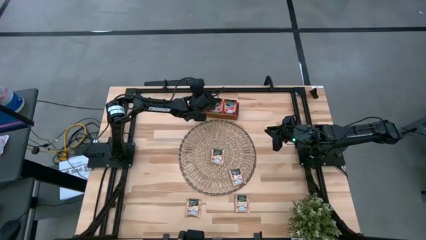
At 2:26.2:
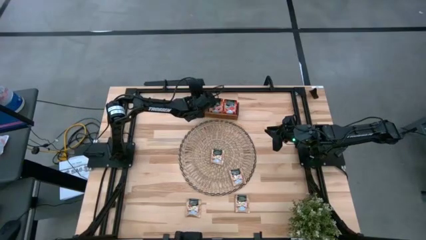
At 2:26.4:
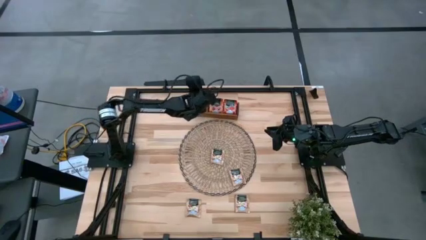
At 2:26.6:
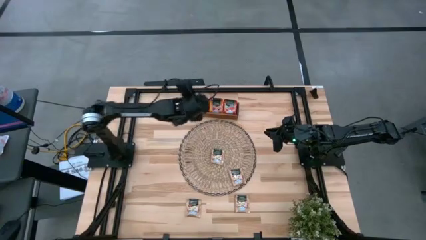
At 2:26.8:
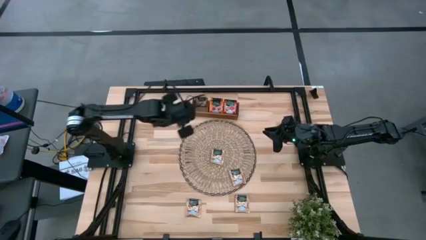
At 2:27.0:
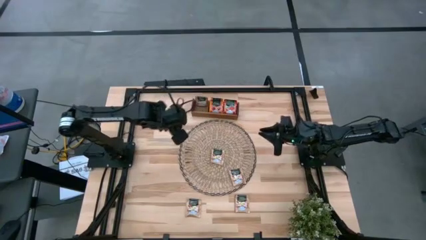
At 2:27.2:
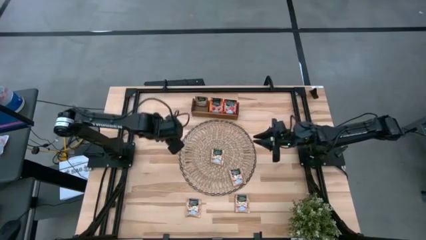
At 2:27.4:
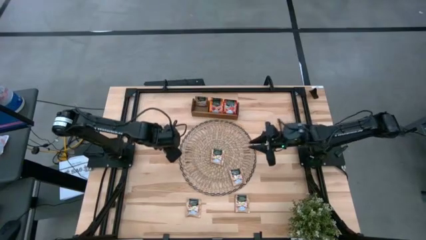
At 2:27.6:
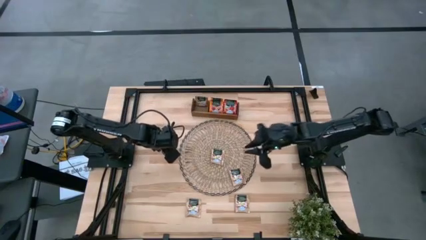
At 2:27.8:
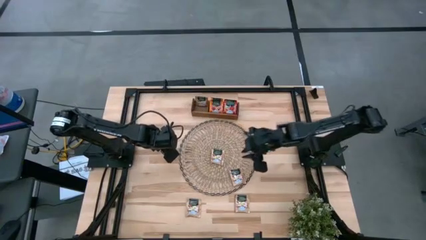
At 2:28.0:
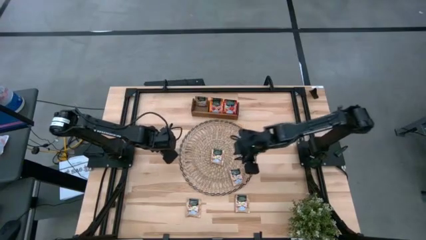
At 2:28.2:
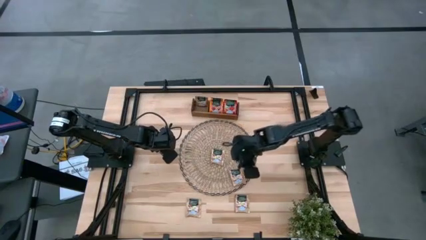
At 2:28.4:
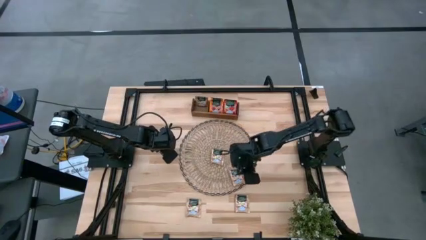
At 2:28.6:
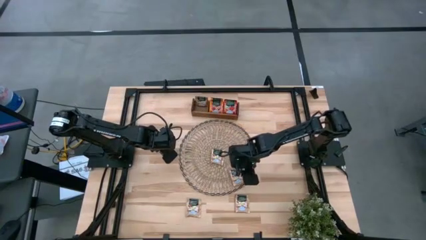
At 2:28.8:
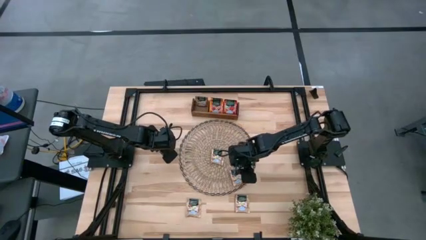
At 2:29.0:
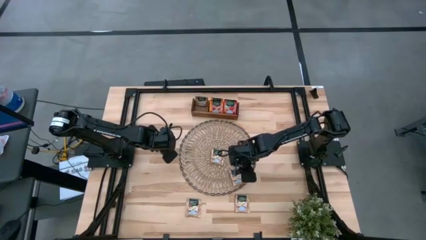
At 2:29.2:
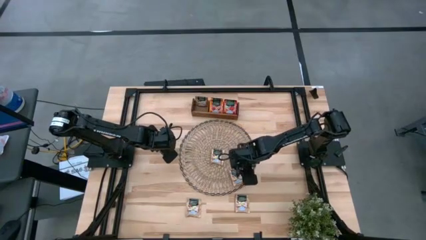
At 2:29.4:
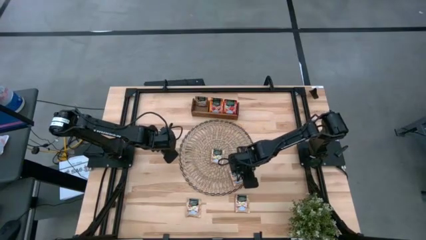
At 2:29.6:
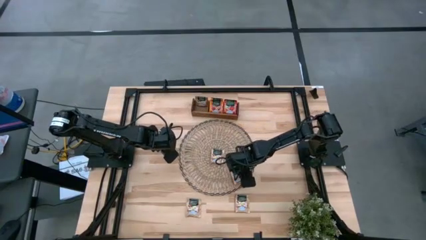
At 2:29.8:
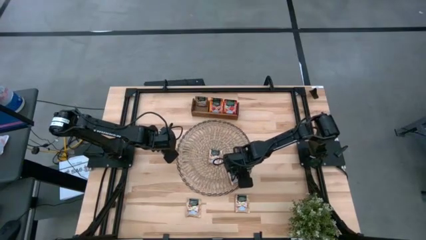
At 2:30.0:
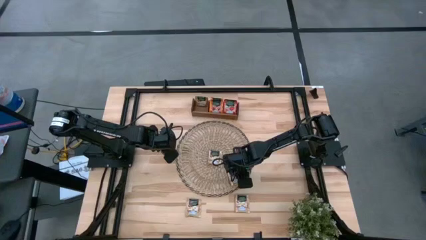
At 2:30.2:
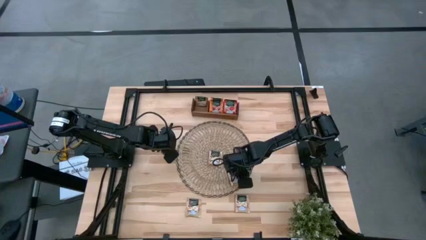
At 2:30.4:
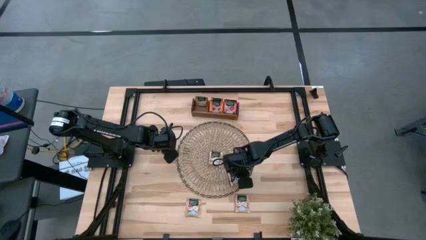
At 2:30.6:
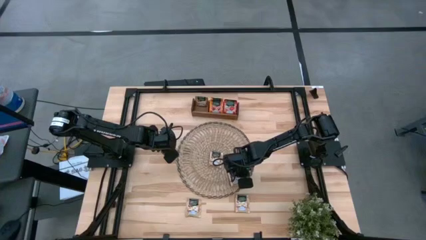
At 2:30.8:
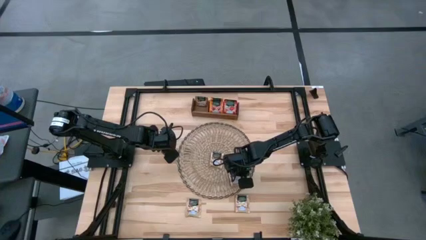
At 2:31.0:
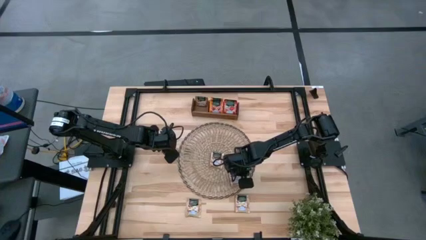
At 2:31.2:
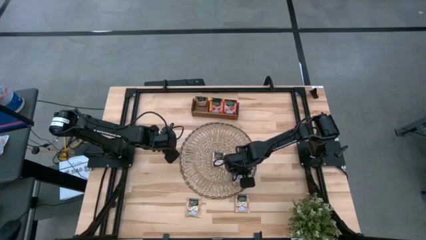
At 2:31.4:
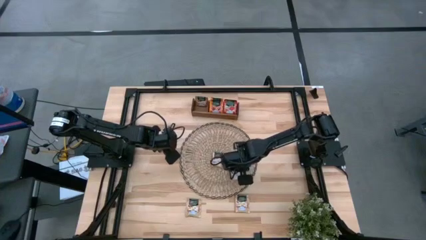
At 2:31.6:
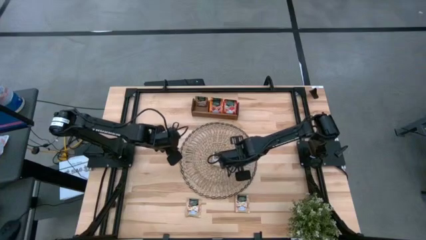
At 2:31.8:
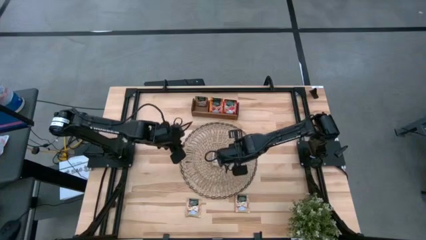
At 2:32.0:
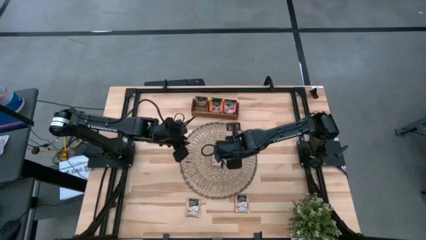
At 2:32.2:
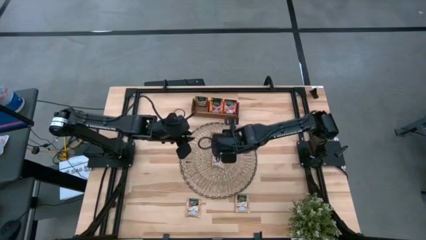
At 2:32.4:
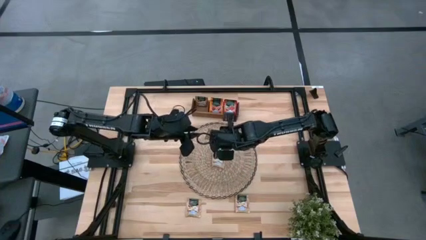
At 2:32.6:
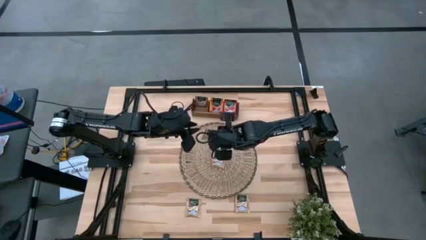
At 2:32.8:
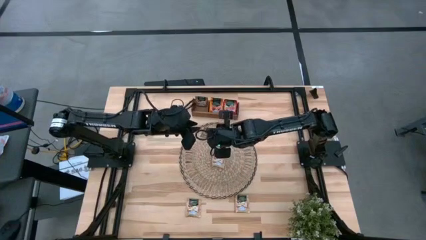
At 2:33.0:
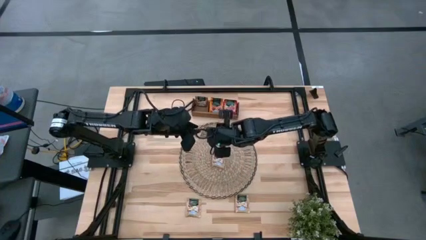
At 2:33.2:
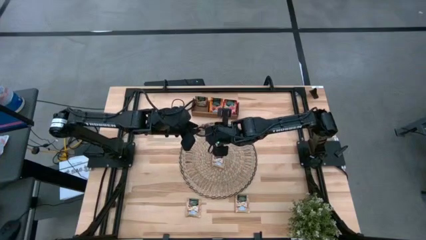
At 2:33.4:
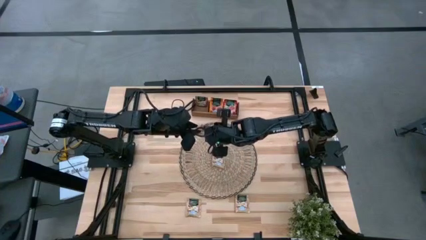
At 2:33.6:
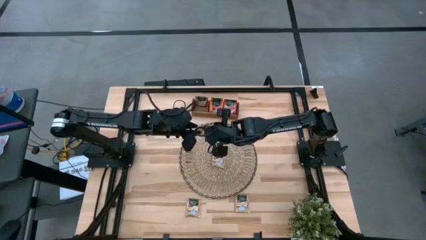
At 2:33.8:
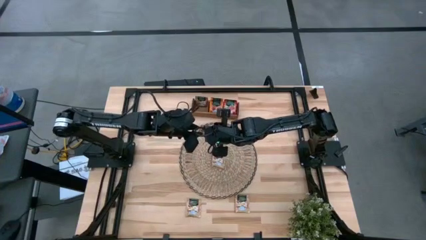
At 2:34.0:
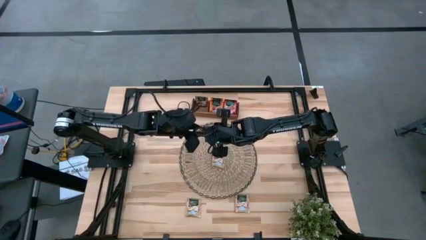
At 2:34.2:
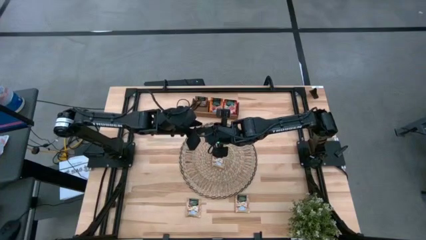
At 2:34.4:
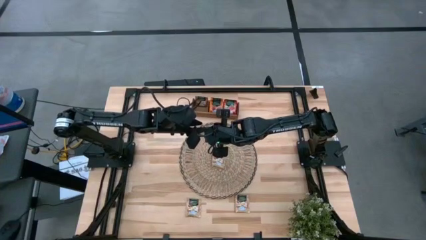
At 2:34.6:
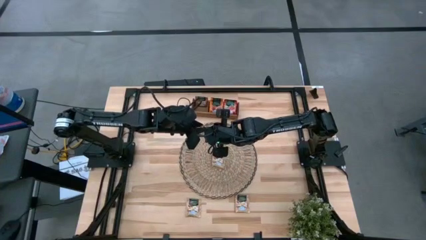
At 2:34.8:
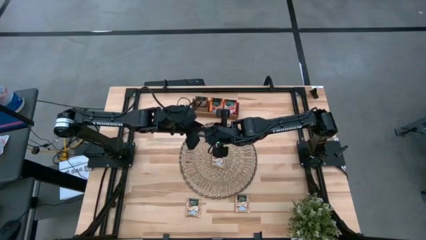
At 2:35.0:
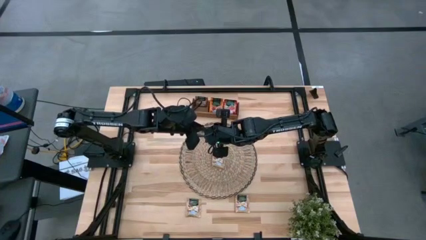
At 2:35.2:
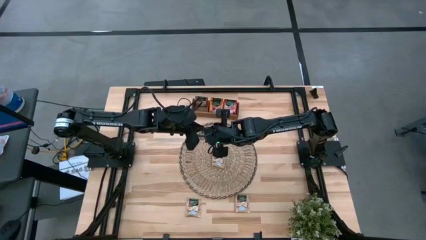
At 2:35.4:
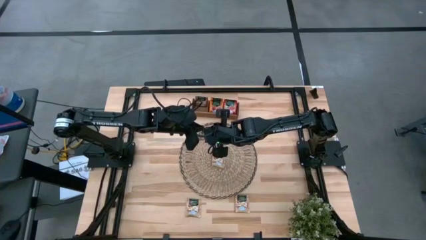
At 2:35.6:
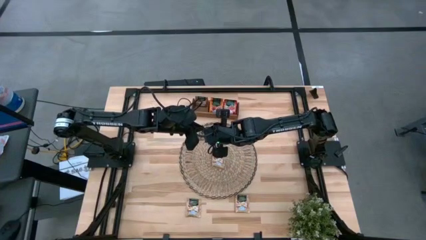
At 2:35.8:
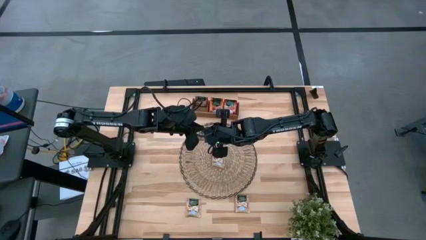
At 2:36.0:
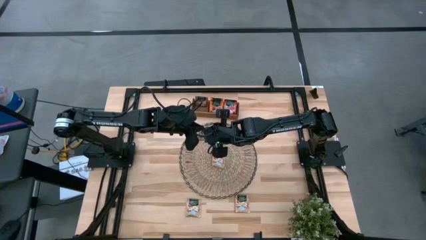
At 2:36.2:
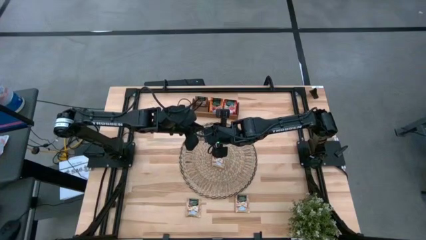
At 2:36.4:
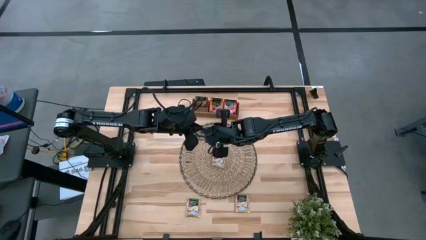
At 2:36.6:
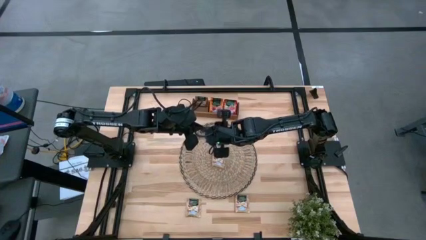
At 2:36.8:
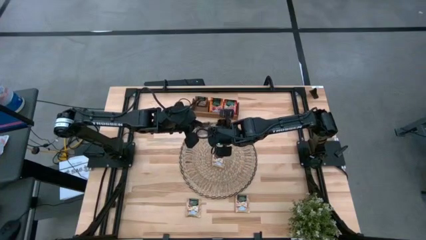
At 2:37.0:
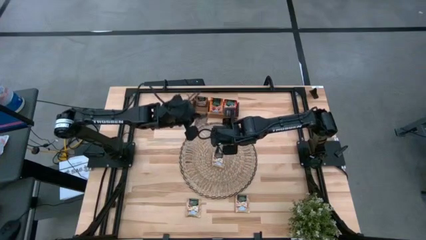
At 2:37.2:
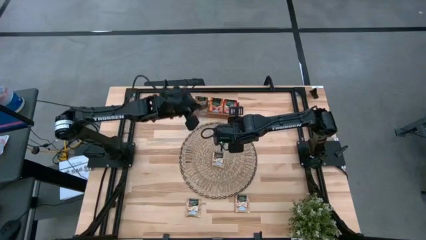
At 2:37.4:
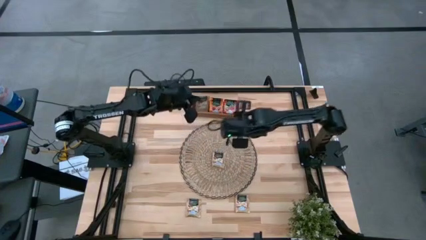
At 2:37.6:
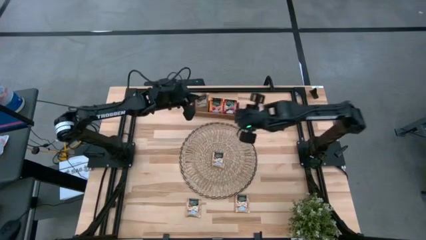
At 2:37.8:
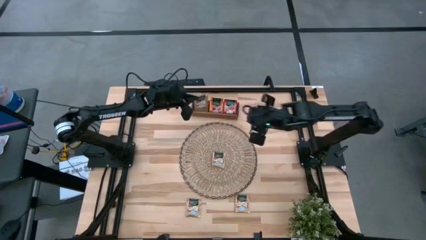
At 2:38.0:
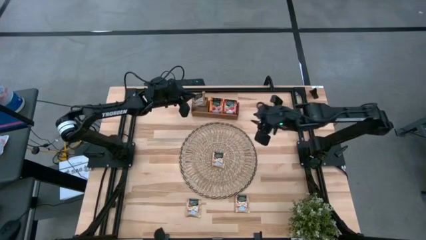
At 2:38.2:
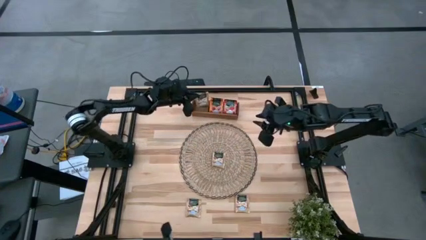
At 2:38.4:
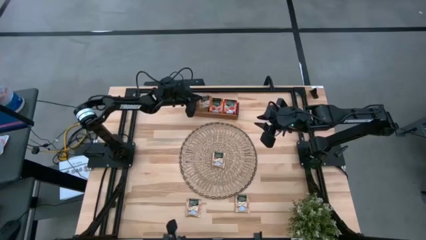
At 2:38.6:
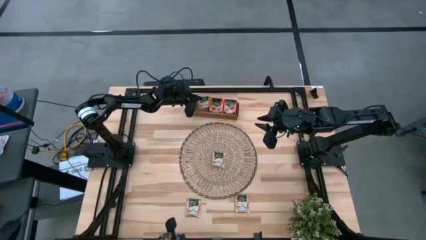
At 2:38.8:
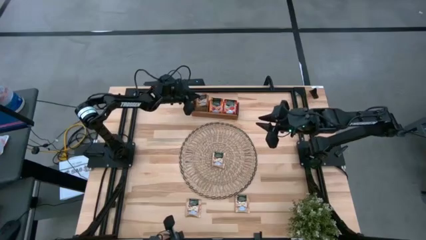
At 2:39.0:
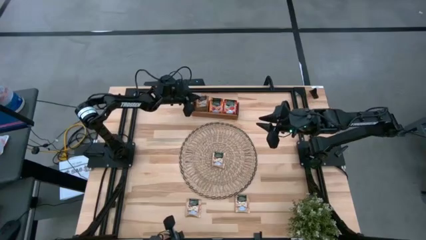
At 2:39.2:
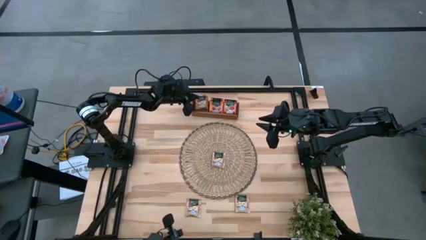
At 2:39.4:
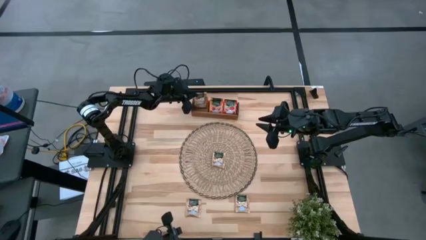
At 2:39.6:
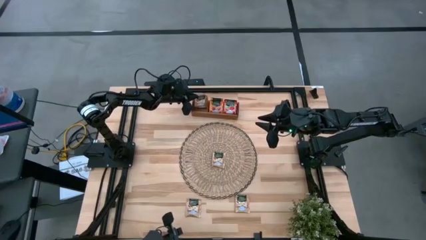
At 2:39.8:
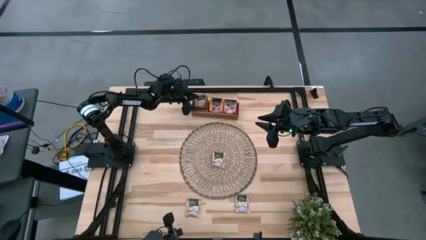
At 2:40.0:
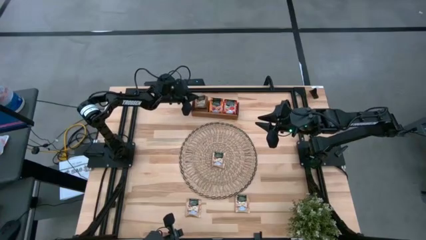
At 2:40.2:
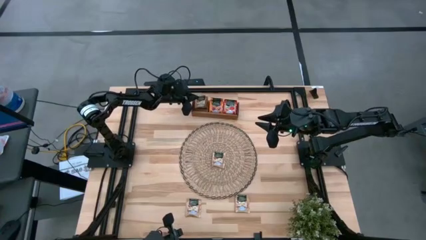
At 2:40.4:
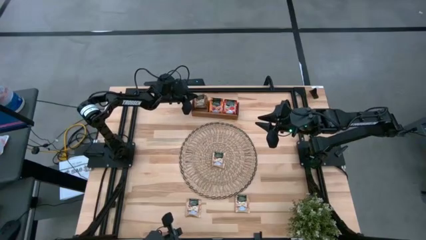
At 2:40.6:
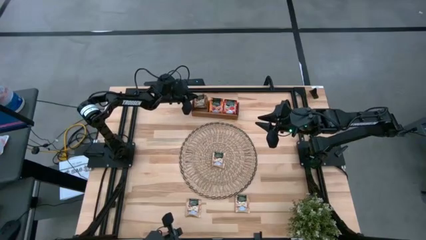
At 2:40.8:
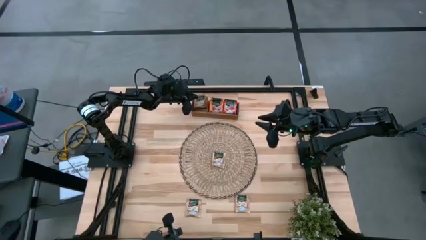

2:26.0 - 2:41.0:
Task: Pick & Place Tea
Put the brown tea bag into the left section of the wooden organizer
